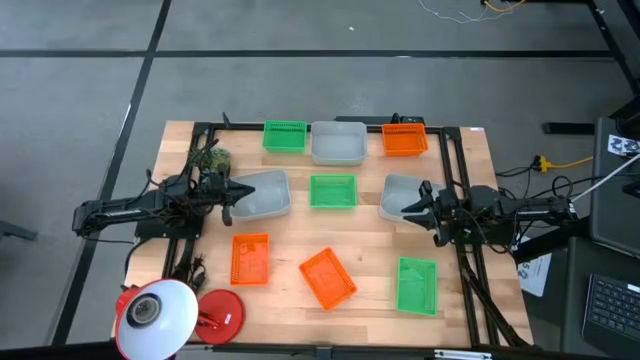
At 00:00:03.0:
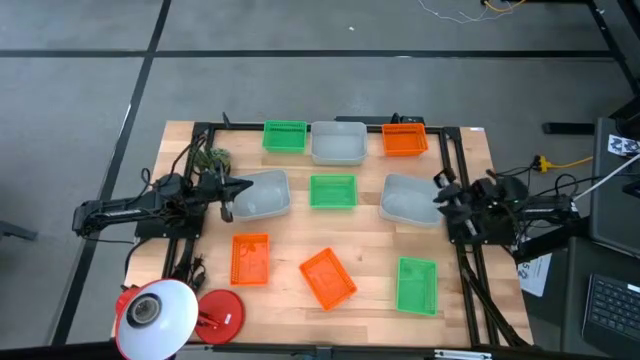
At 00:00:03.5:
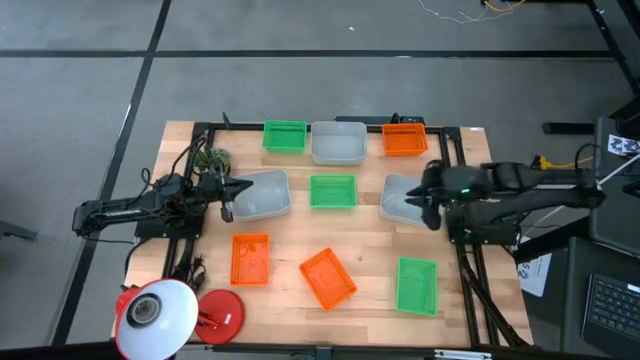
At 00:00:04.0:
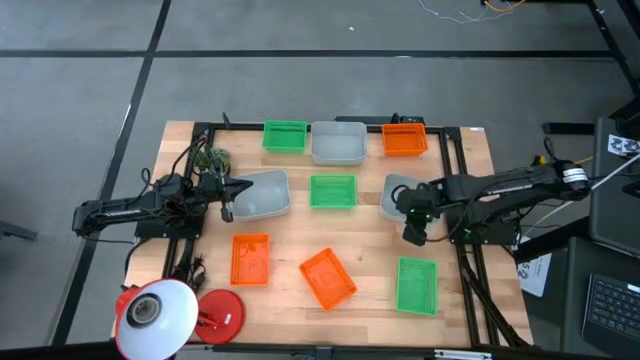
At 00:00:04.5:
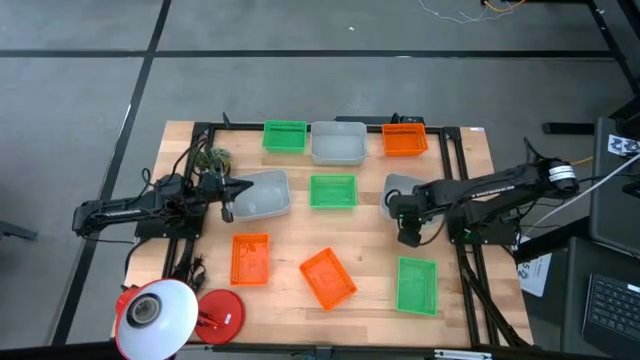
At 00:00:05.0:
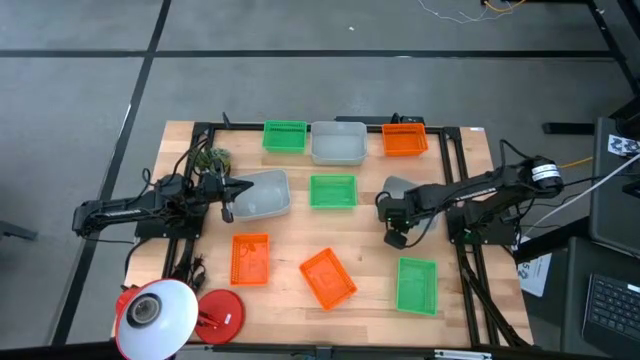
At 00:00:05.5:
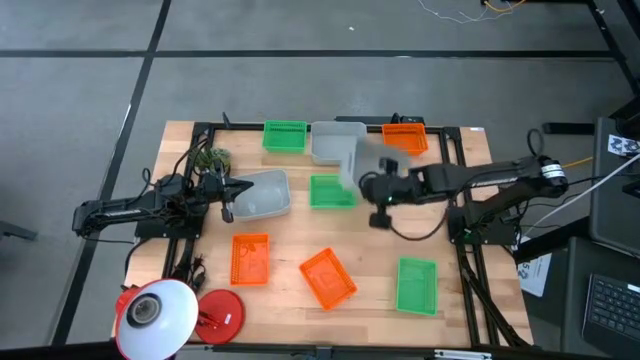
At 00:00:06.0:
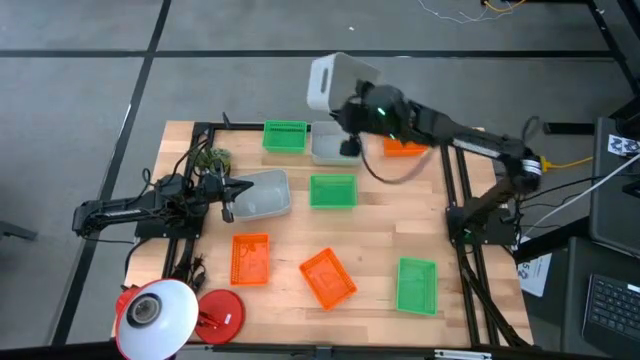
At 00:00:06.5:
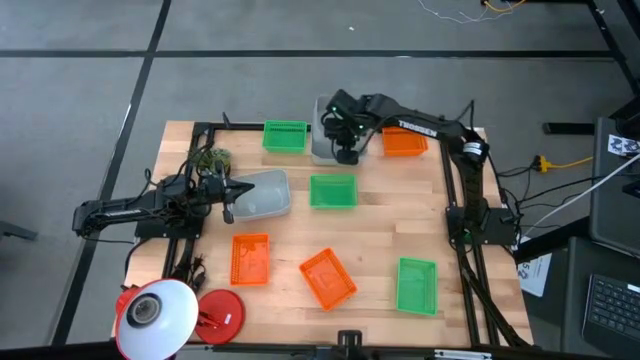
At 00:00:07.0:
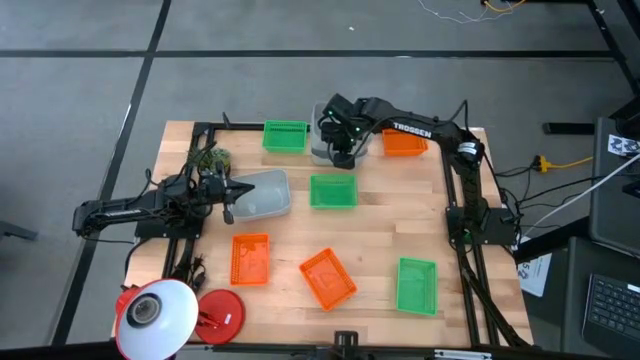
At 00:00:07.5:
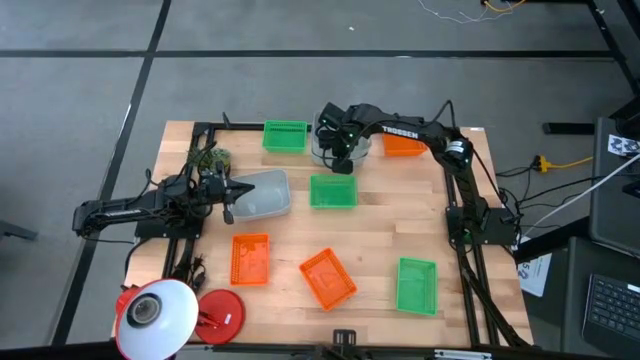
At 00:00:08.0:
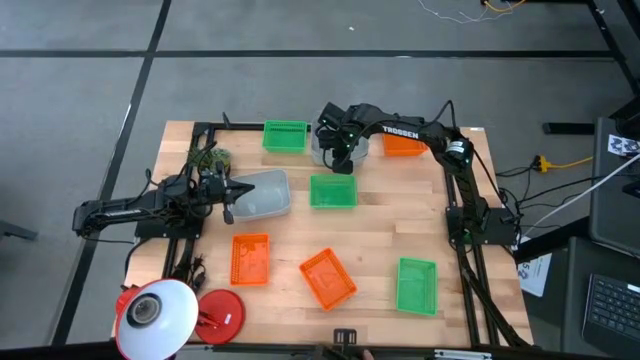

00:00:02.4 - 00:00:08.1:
Stack the bottom right gray bin on top of the top gray bin

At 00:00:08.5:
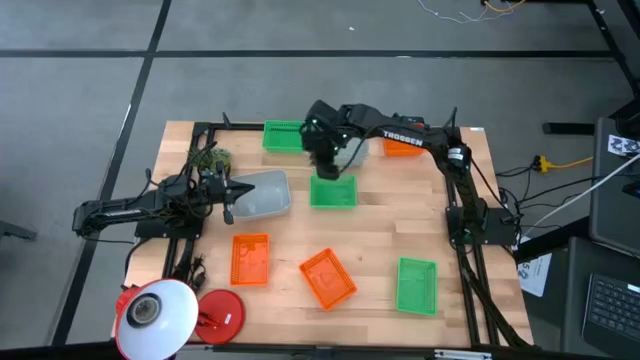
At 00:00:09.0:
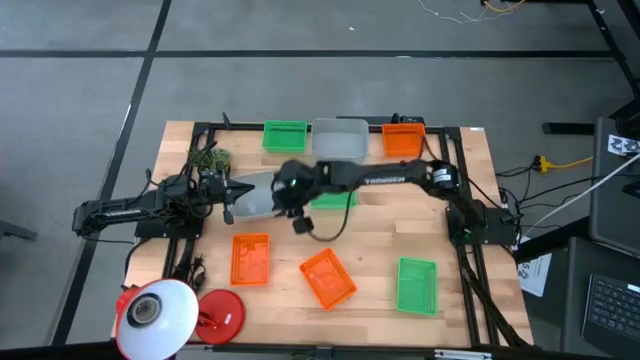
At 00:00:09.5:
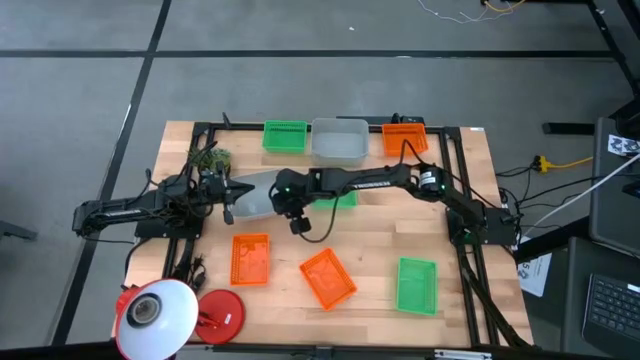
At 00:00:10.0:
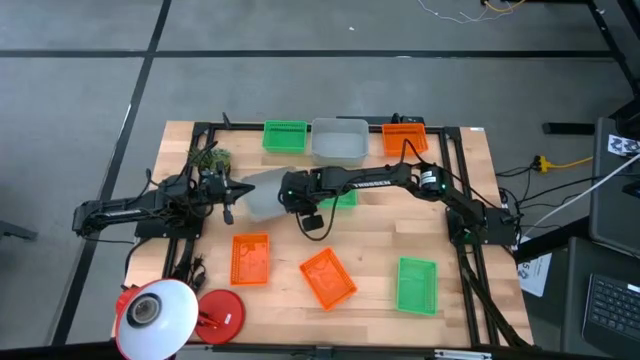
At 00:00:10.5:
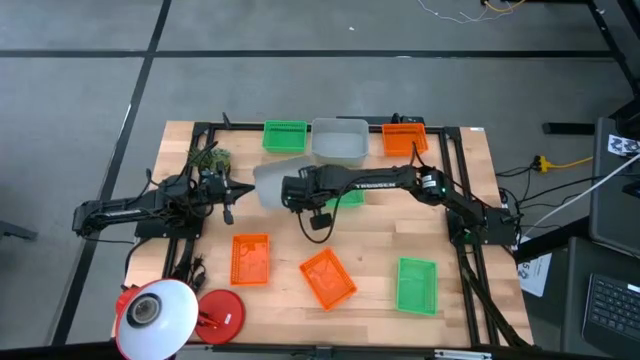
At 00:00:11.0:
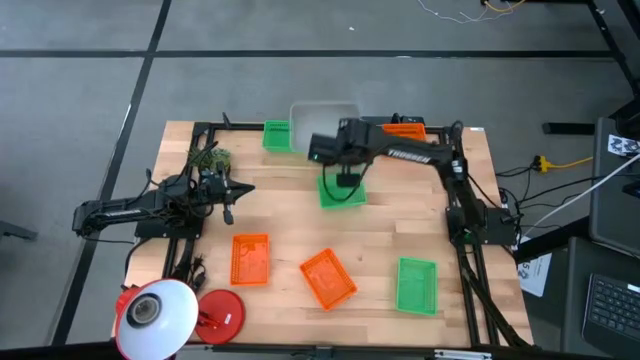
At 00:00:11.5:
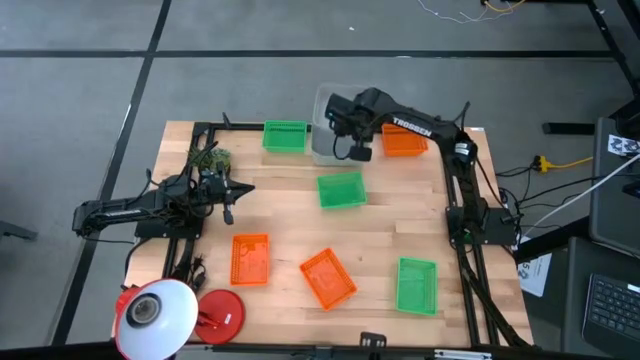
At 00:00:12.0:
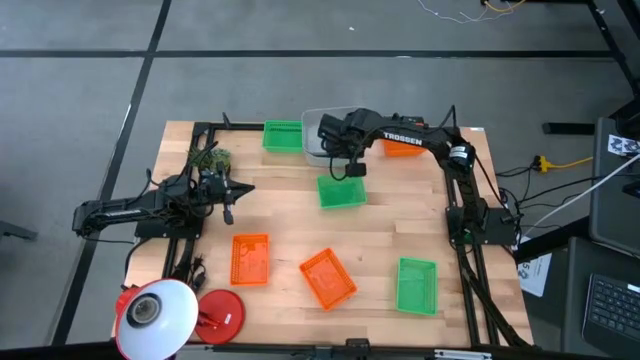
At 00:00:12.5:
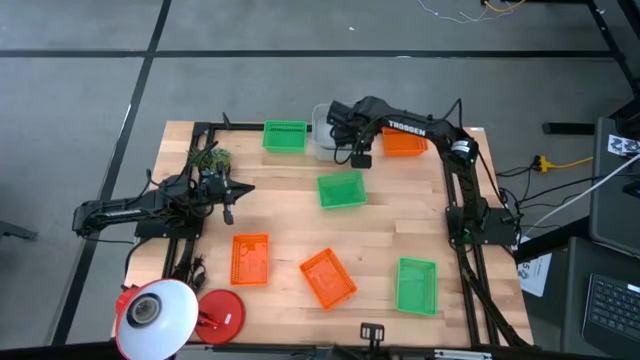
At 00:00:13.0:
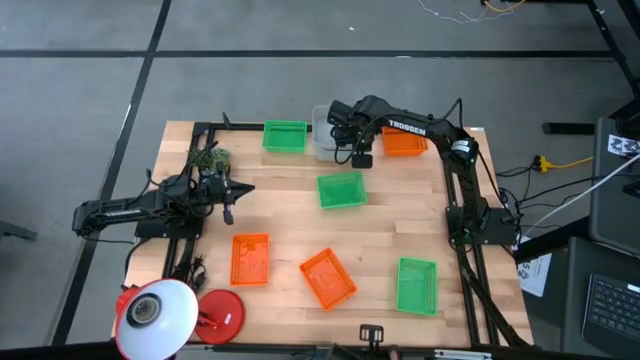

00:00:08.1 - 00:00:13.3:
Stack the bottom gray bin on top of the top gray bin

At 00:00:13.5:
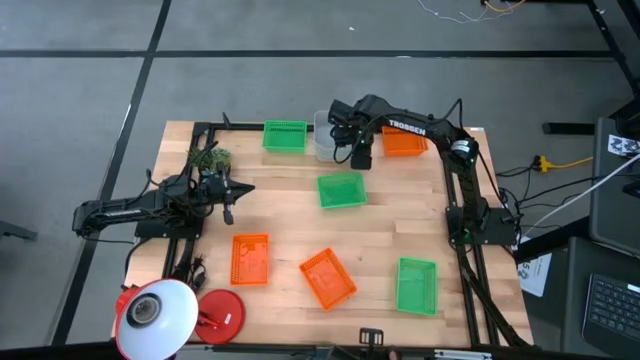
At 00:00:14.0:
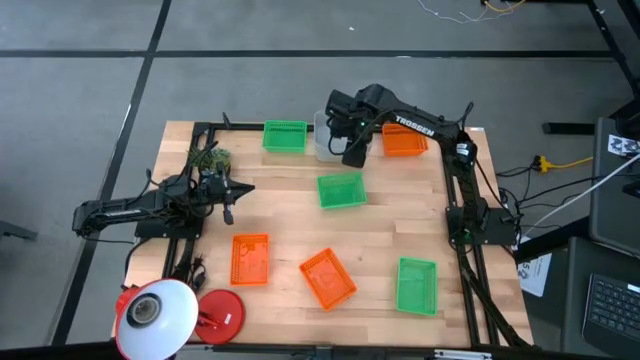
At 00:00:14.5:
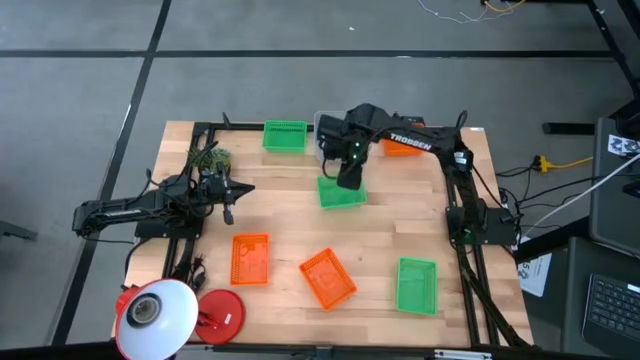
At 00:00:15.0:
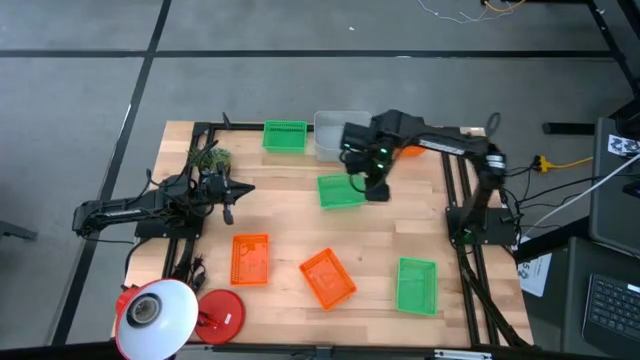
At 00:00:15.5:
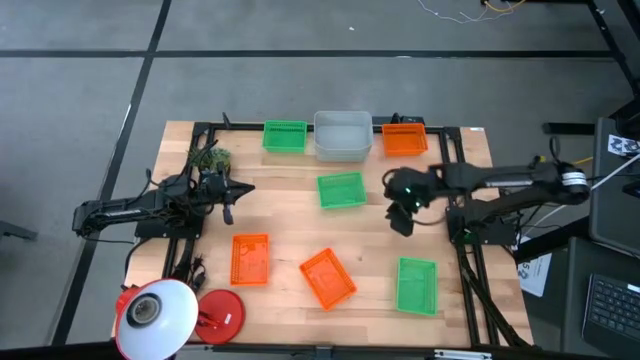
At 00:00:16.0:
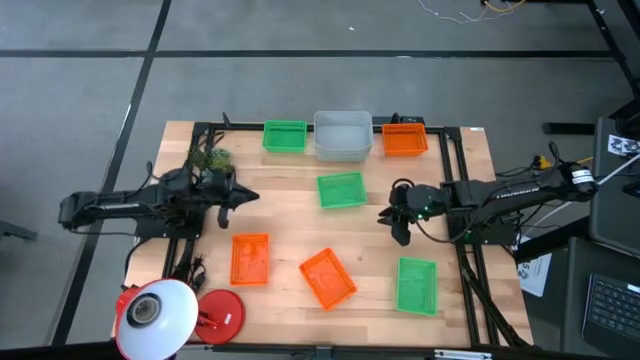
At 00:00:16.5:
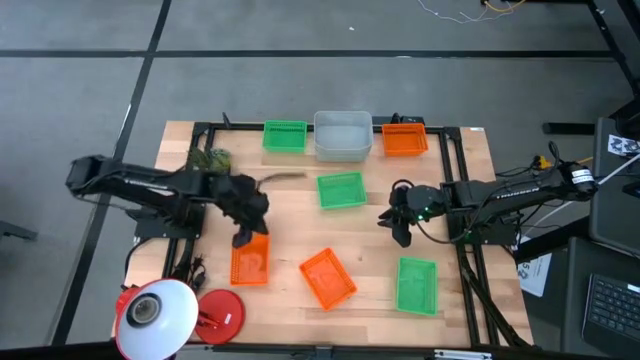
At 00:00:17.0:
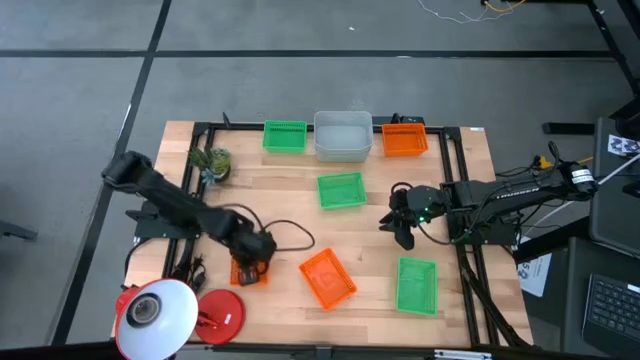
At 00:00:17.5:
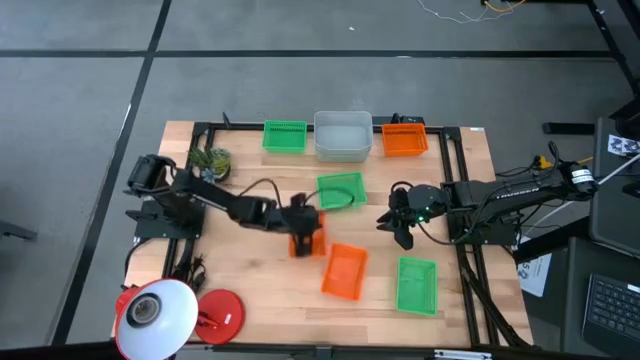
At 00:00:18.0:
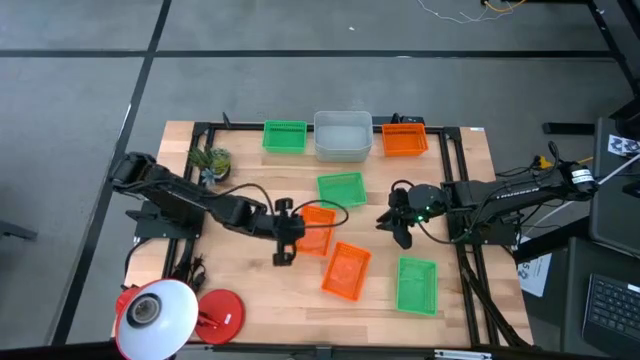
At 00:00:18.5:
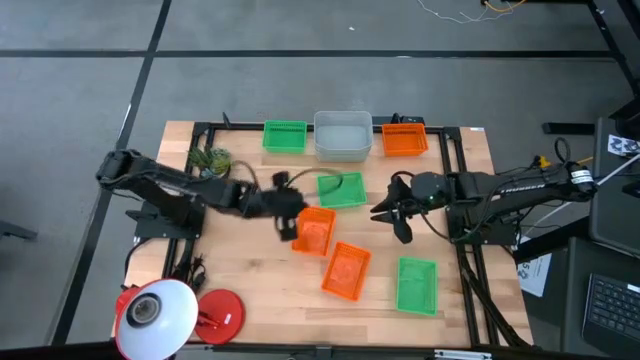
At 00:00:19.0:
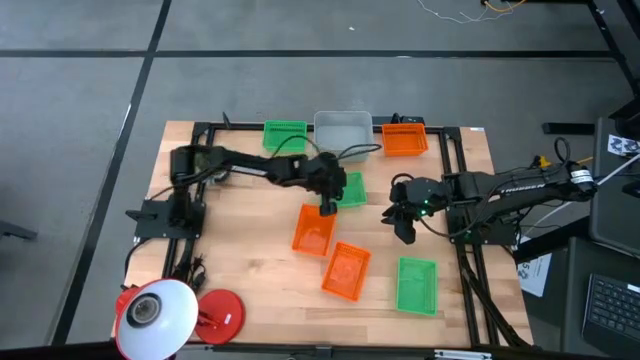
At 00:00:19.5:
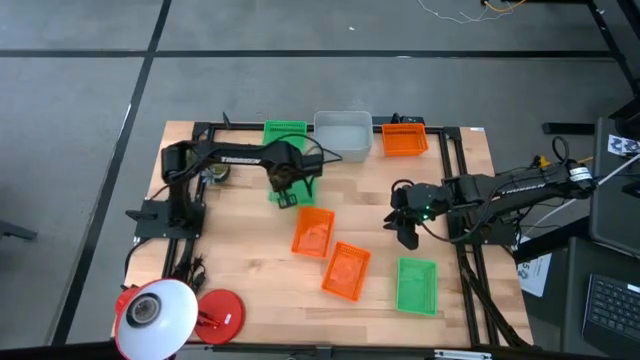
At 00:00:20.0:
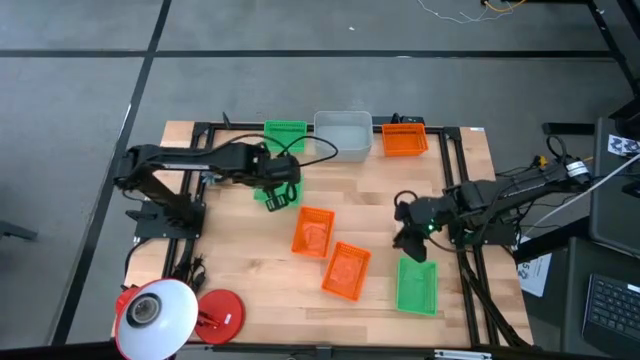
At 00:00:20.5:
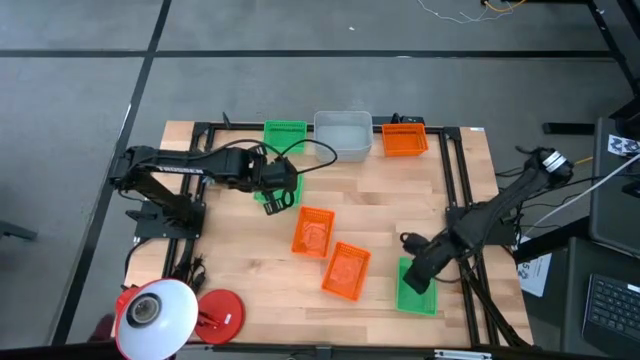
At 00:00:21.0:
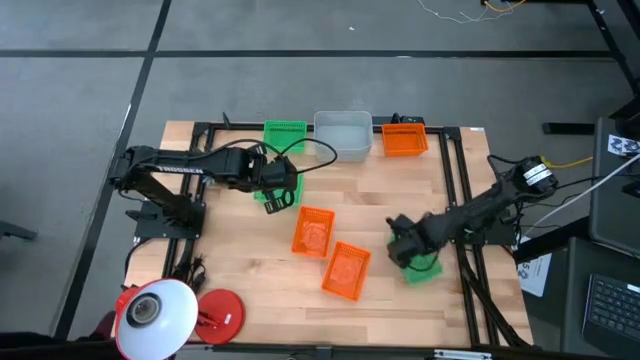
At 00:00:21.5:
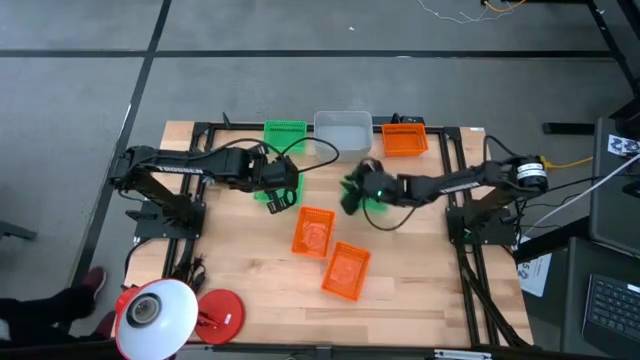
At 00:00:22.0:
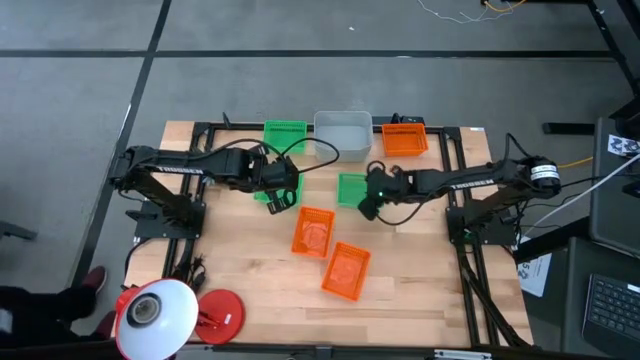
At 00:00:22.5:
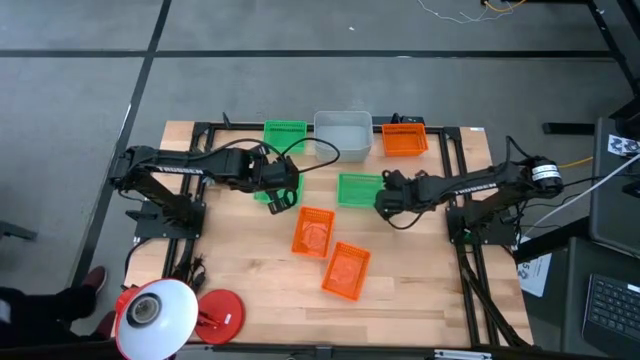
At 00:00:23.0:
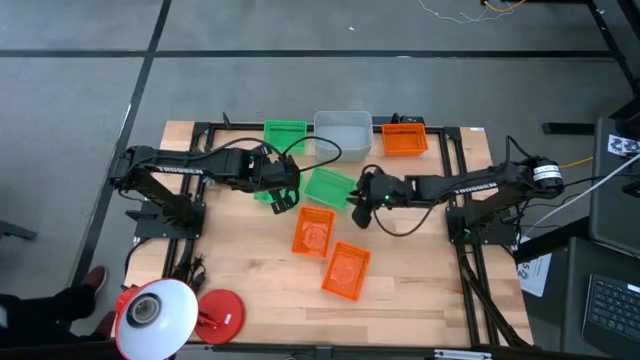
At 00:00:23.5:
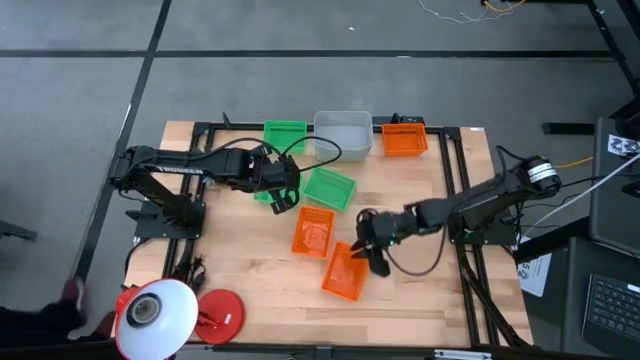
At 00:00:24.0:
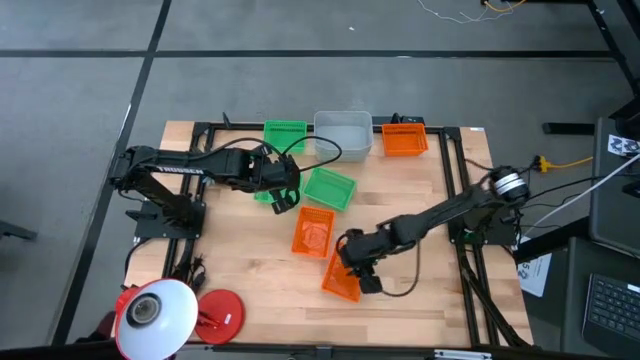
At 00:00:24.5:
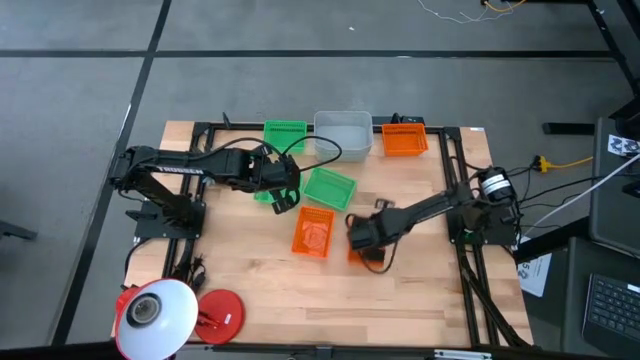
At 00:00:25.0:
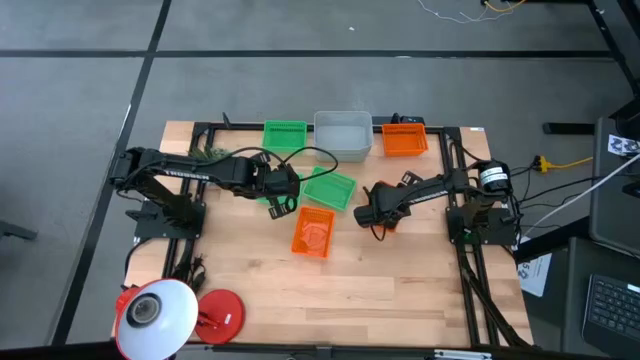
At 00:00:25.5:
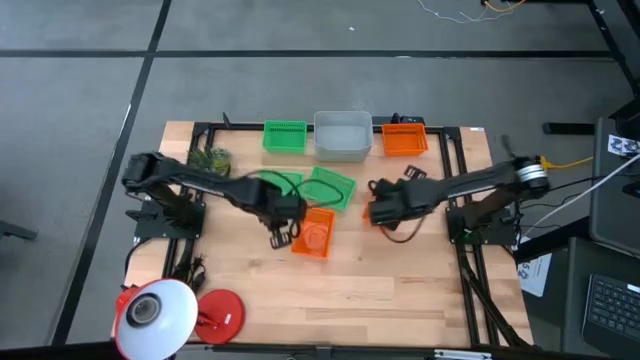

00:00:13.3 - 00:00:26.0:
Adjust the bins
